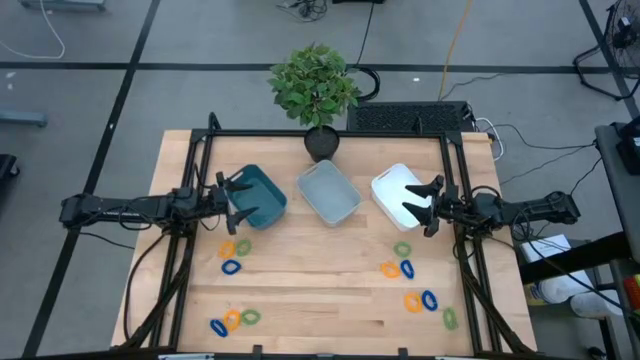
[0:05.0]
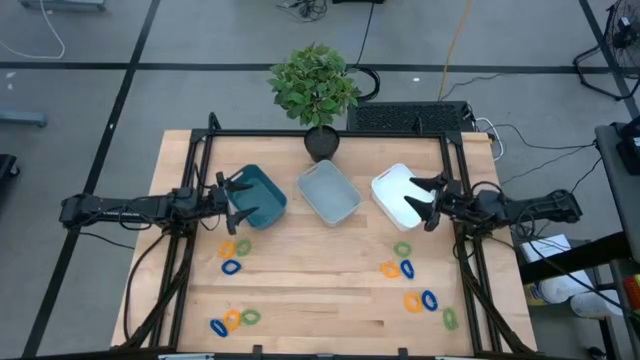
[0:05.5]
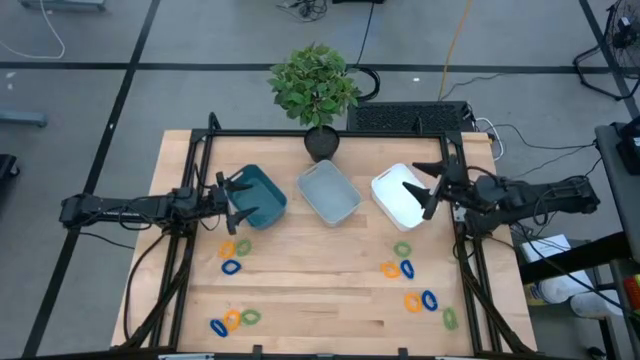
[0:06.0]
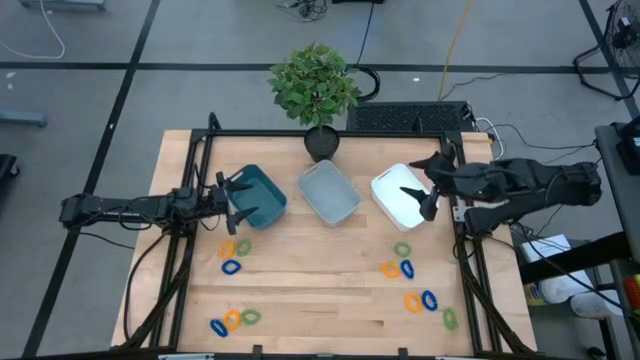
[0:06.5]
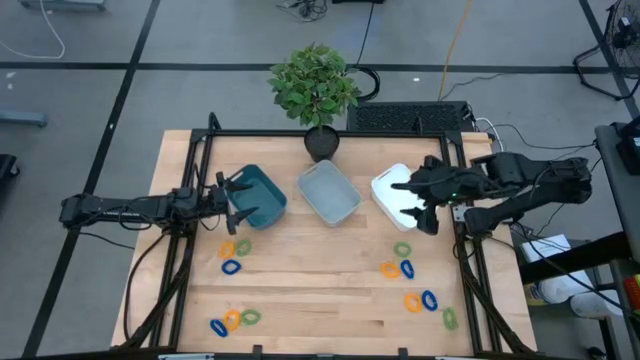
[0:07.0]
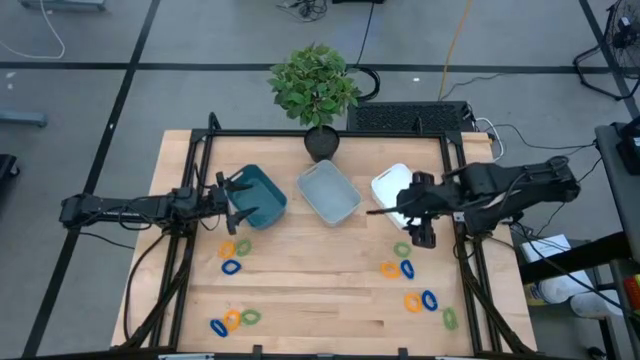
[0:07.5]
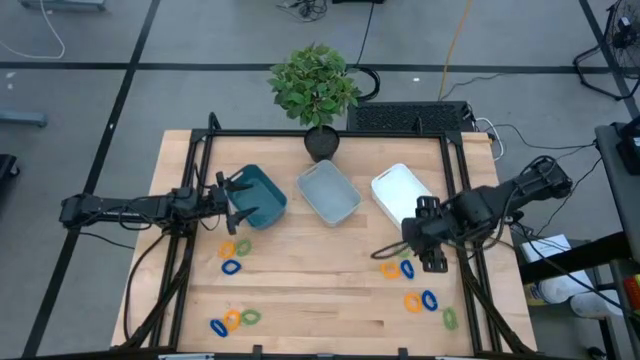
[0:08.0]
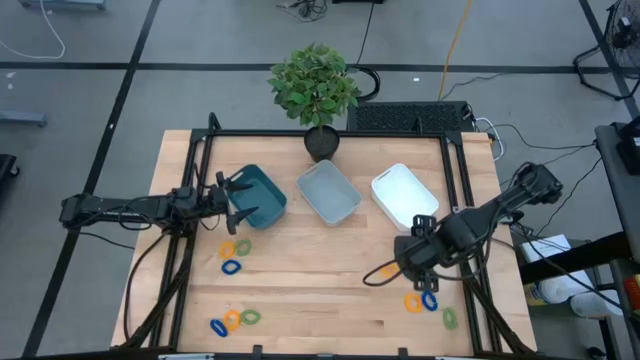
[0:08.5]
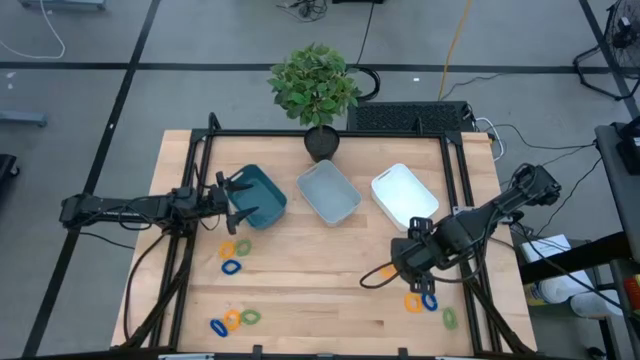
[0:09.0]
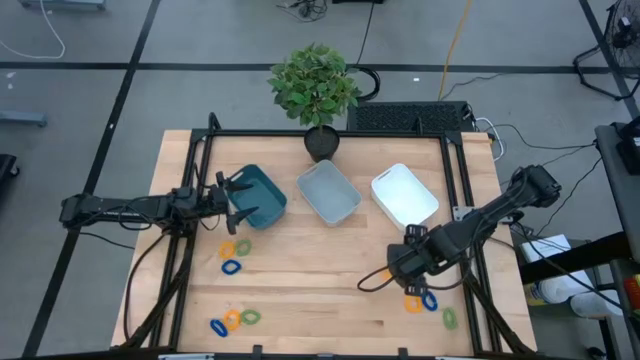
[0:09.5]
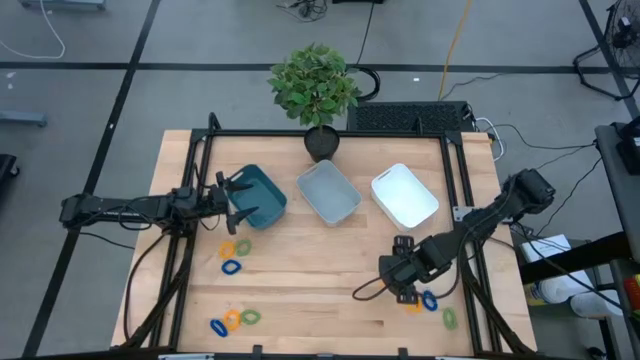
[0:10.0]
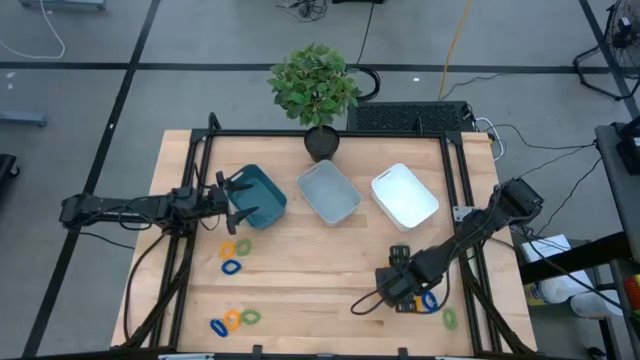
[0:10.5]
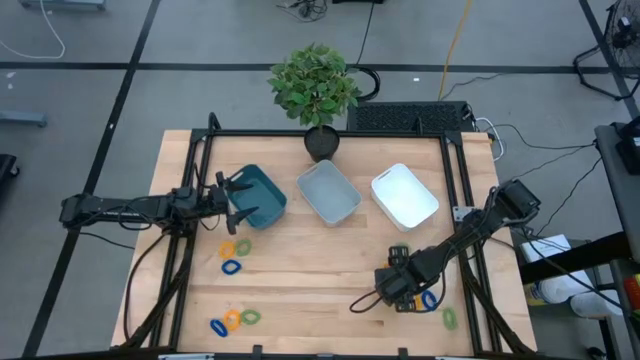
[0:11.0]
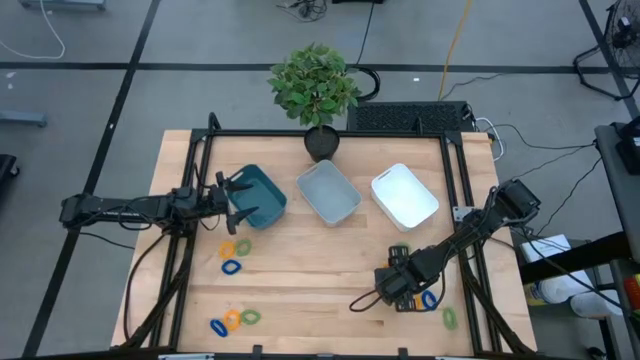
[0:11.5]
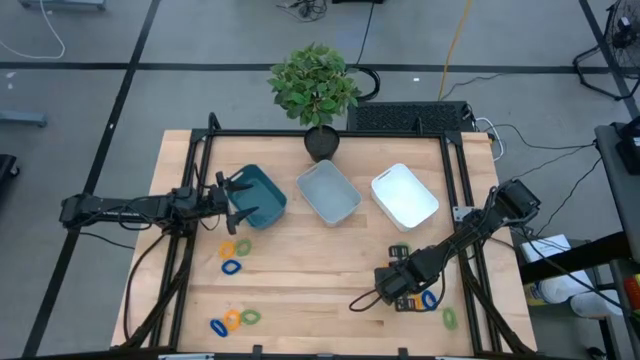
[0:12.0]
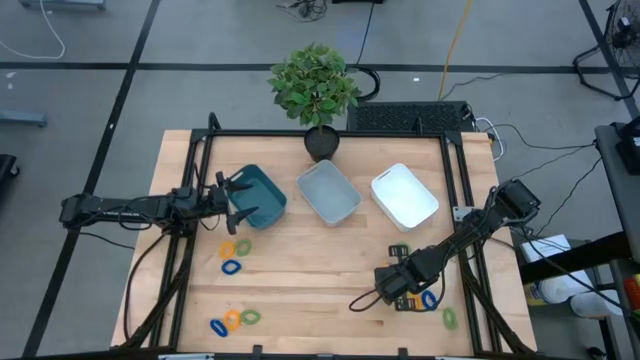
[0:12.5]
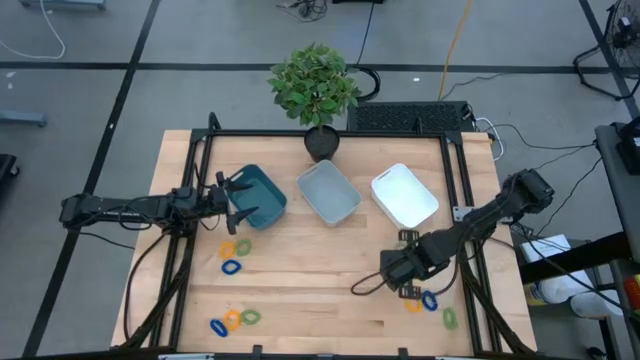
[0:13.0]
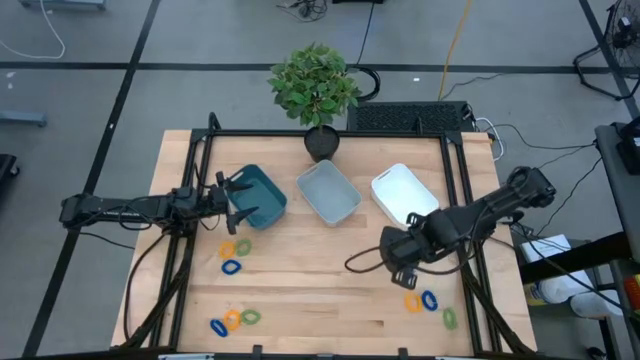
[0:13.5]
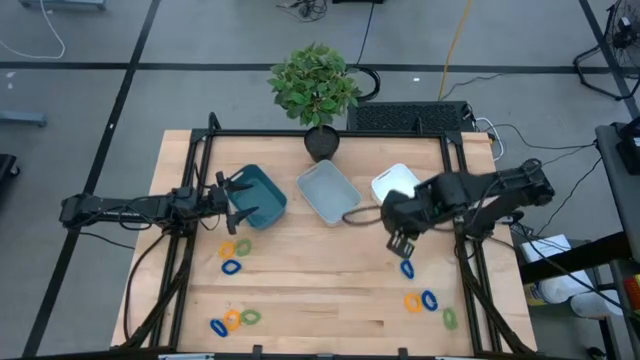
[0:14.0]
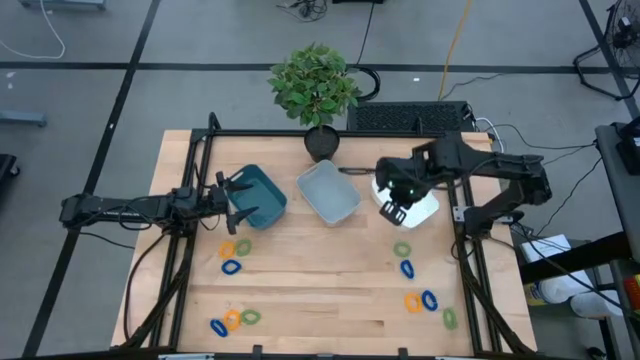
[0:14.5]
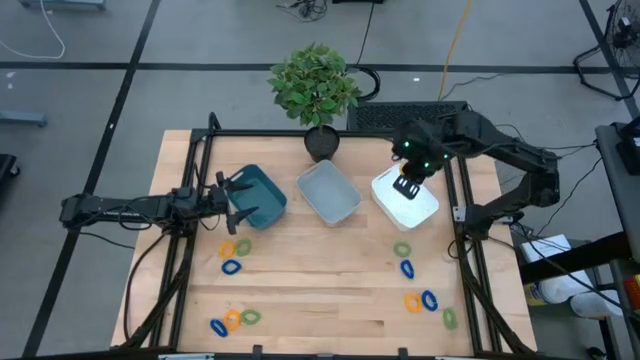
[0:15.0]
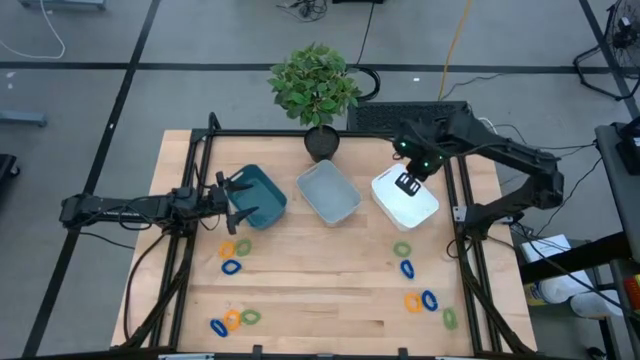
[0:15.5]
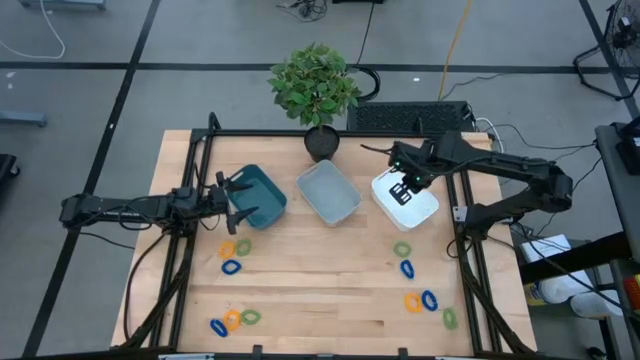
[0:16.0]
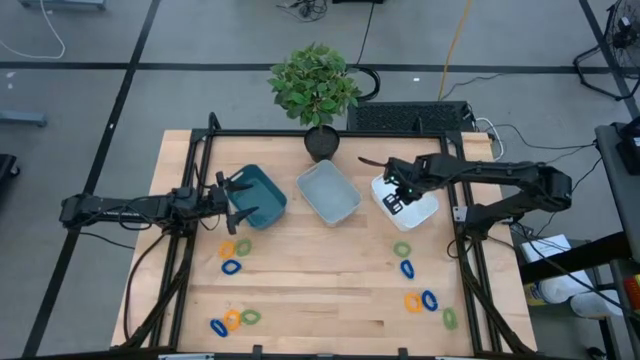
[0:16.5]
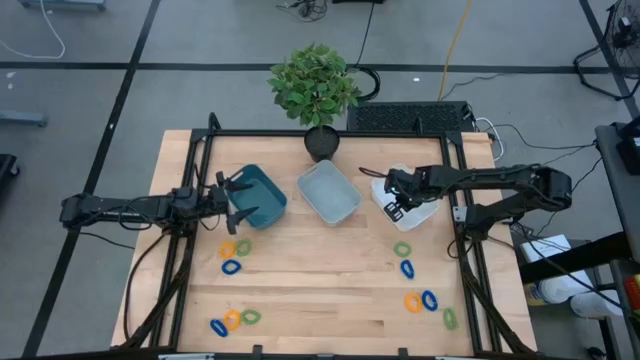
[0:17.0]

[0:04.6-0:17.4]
Task: Sort spring keychains
Put the top right yellow spring keychain into the white bin
